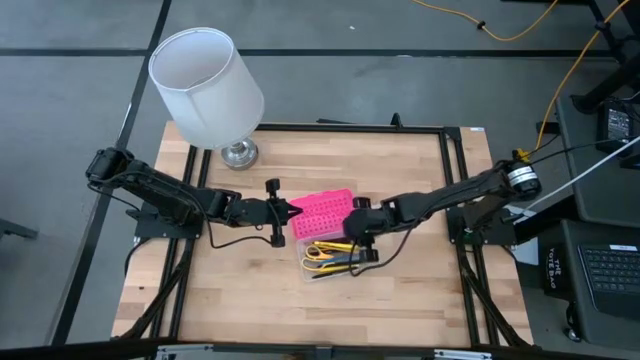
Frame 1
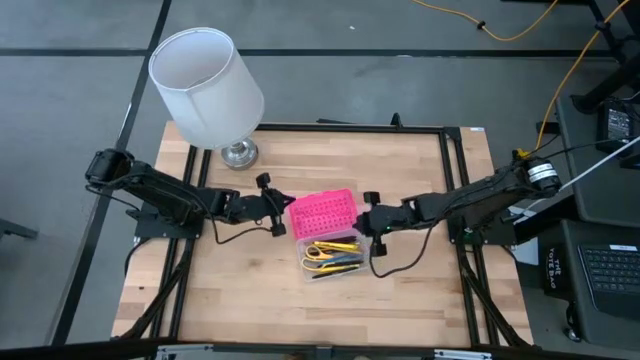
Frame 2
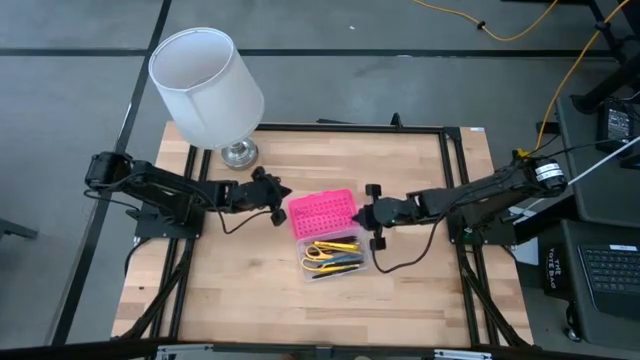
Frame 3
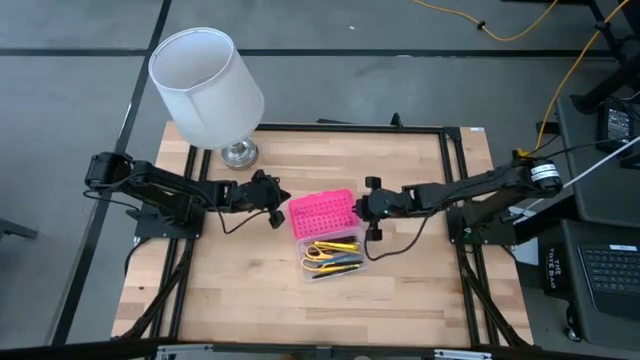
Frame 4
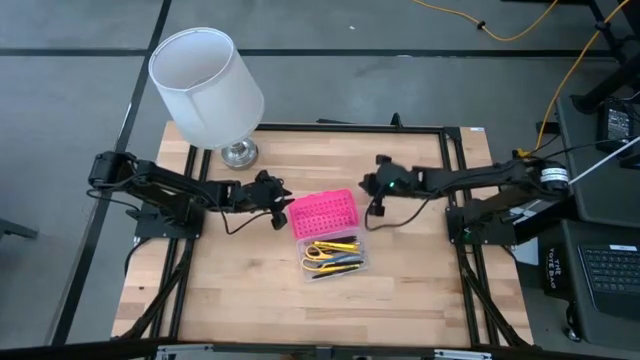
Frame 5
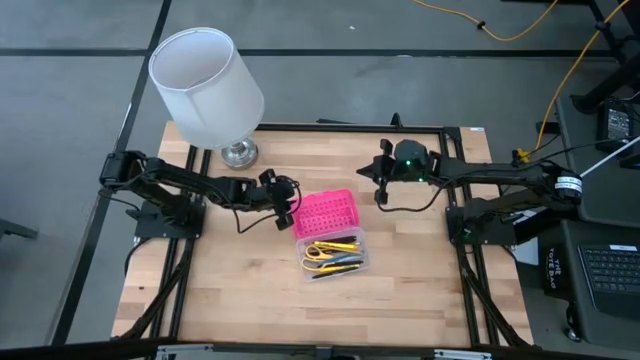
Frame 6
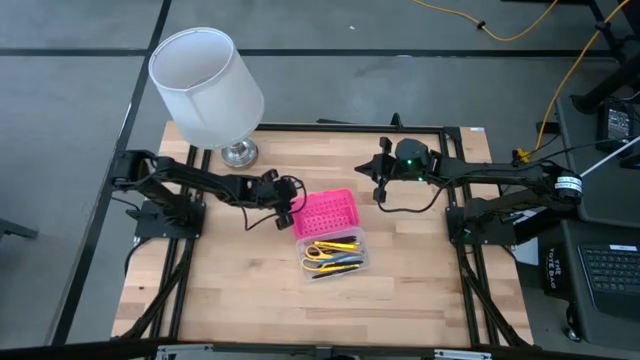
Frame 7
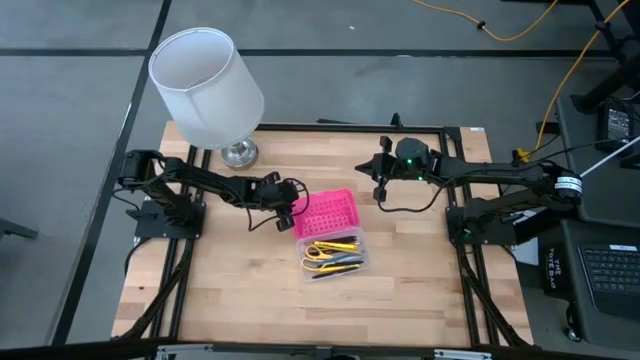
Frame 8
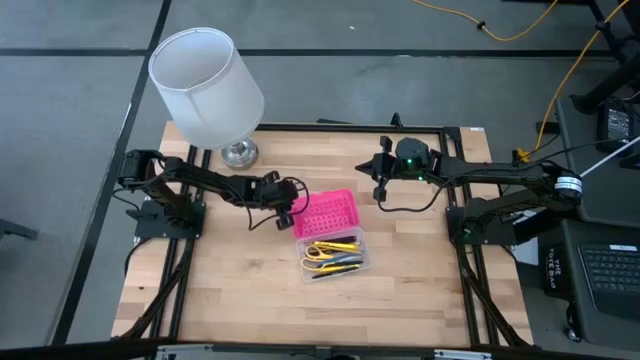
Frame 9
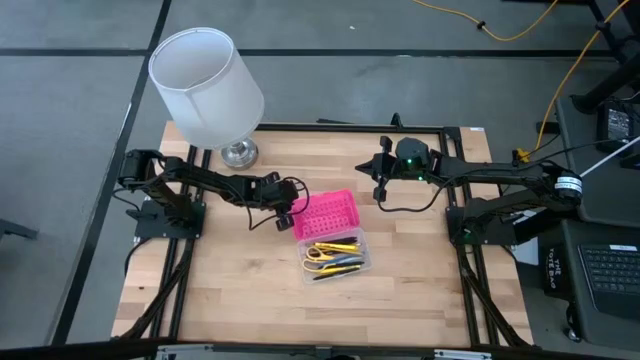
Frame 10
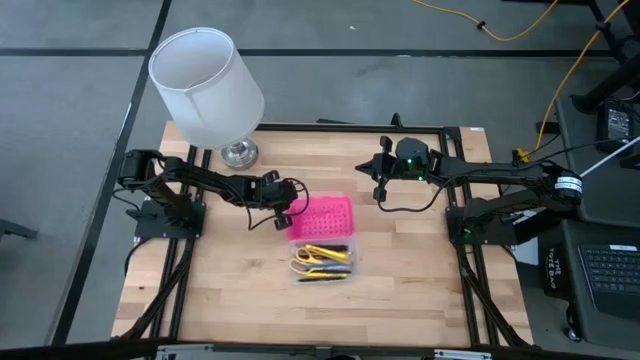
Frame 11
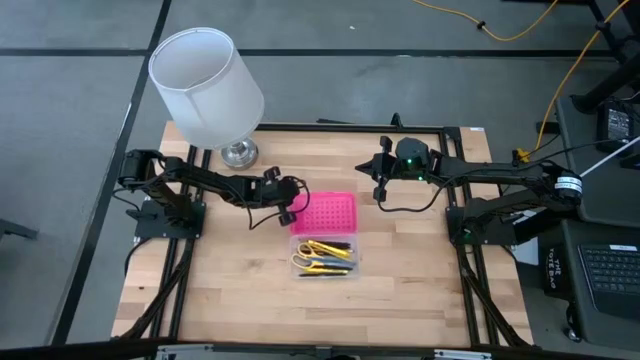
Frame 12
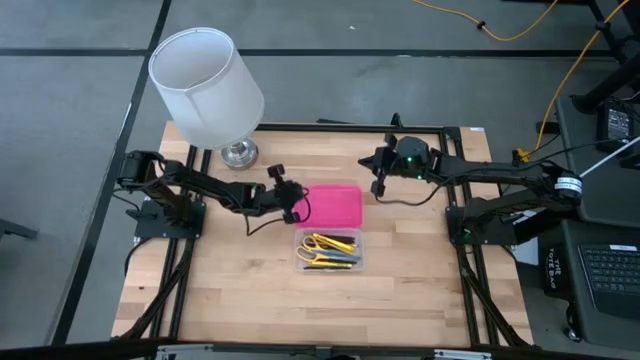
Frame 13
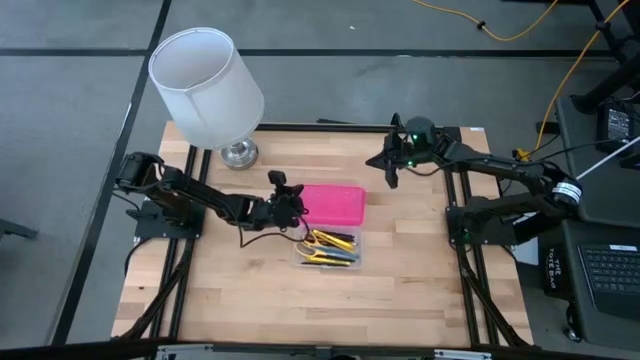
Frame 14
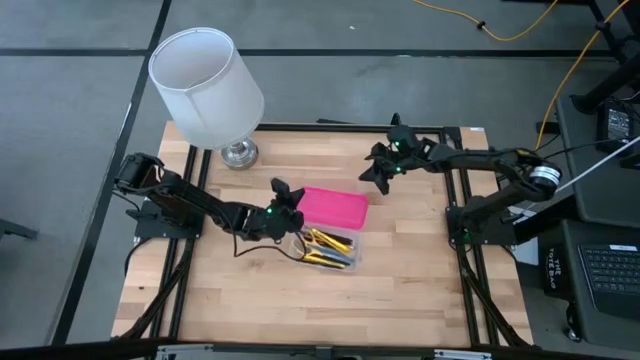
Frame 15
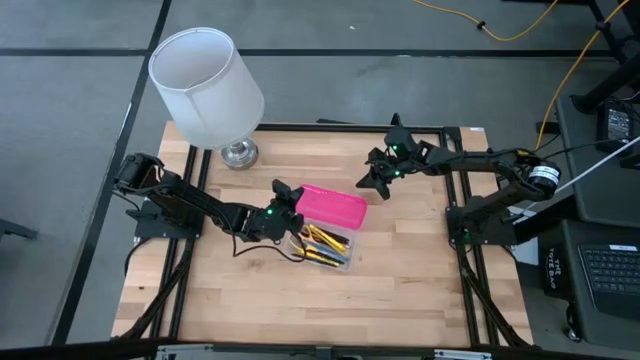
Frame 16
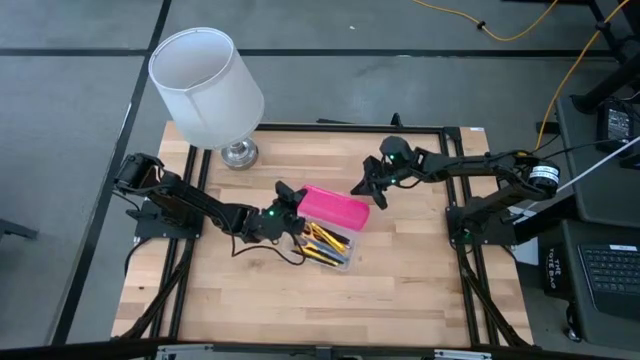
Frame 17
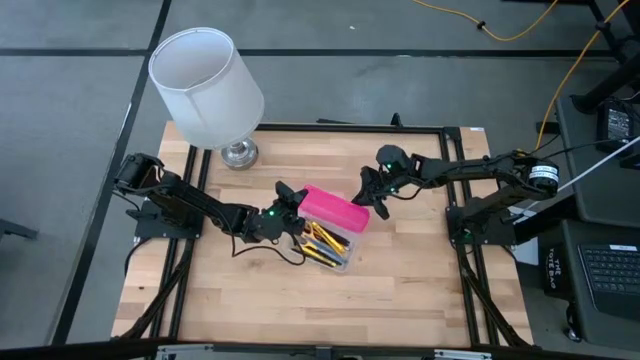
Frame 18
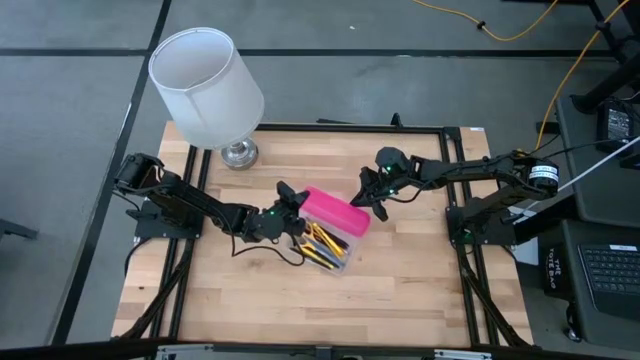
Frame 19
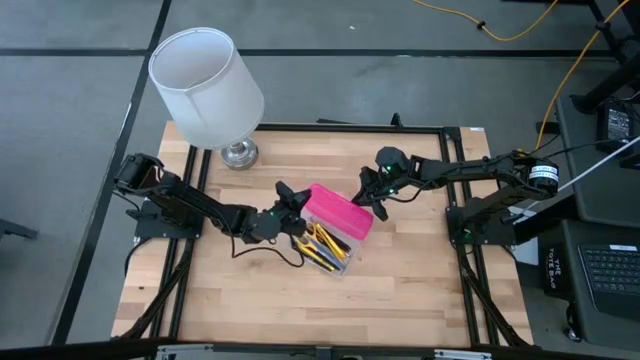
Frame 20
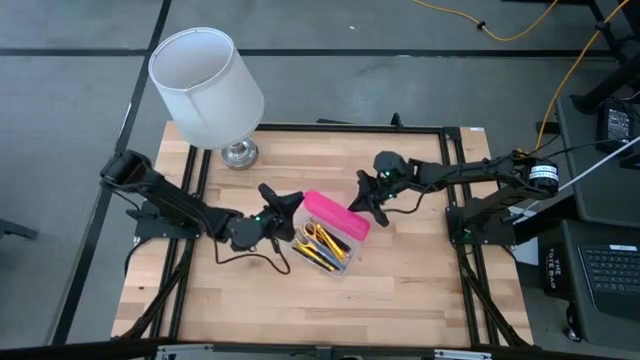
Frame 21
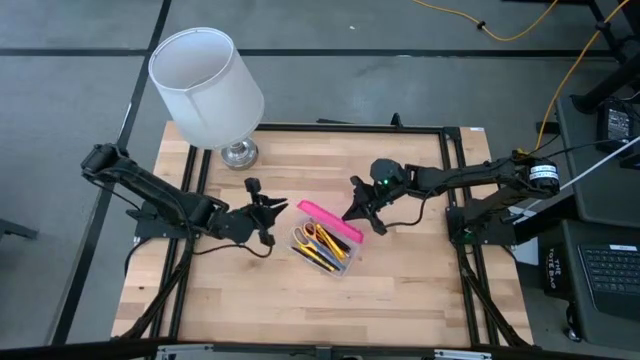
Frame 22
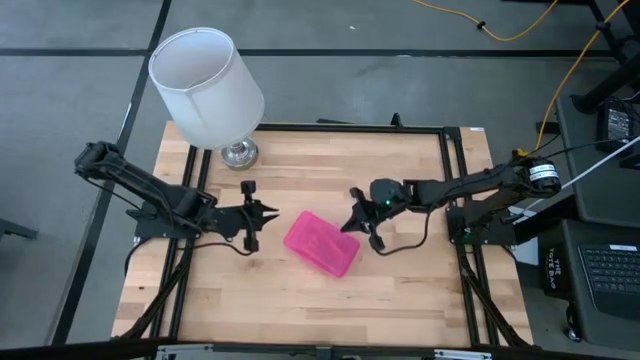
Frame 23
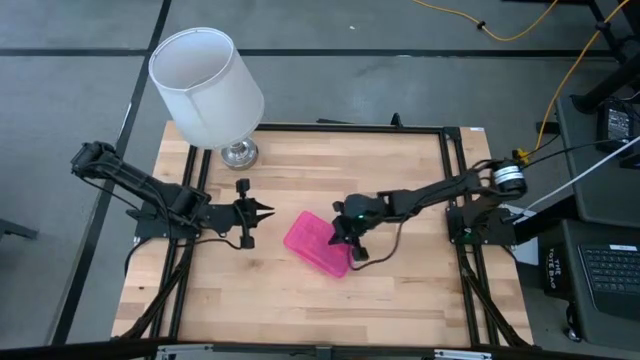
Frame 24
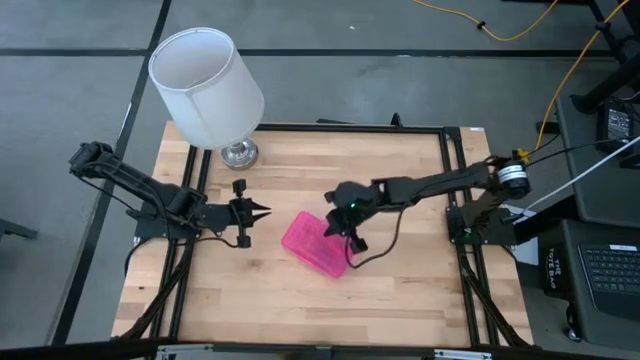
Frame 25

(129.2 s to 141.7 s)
Task: Pick & place school supplies into a supply box
Close the pink supply box

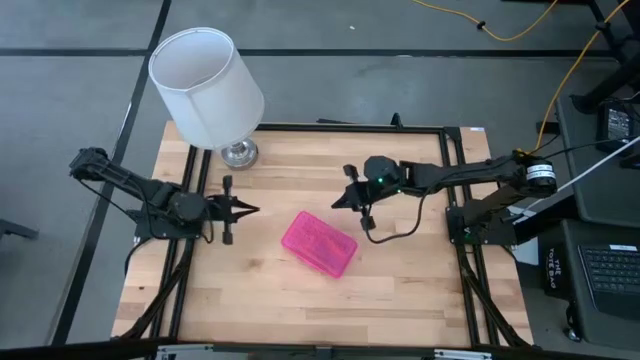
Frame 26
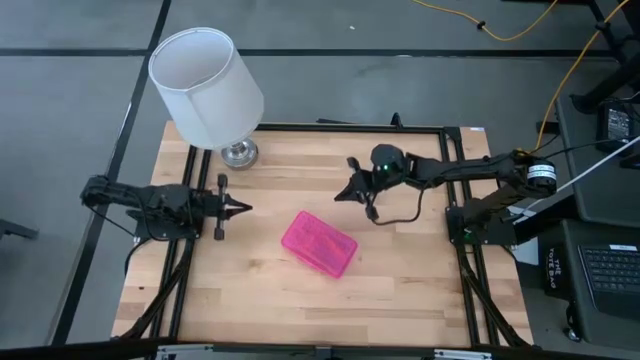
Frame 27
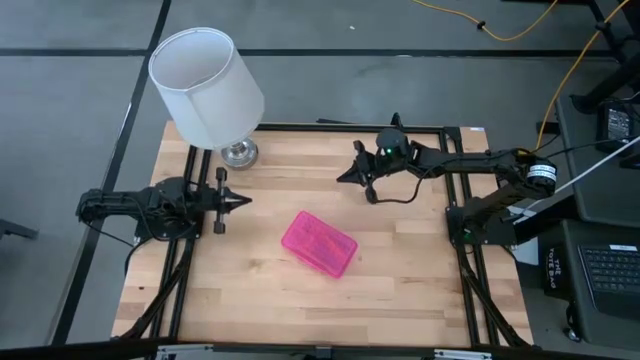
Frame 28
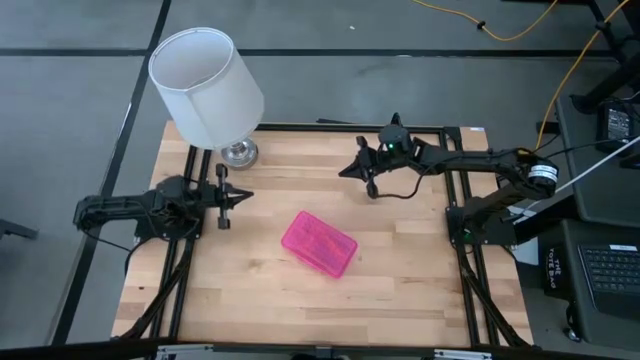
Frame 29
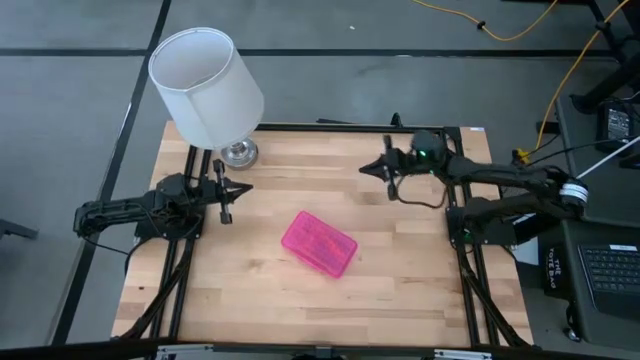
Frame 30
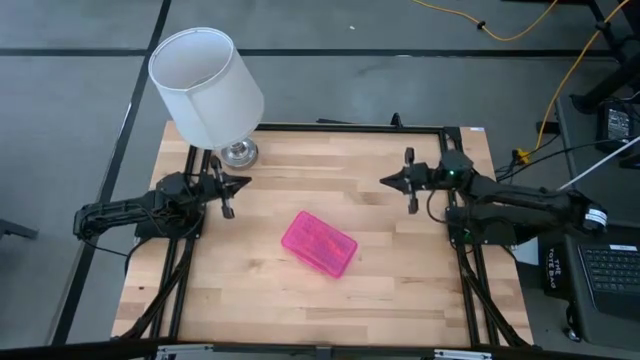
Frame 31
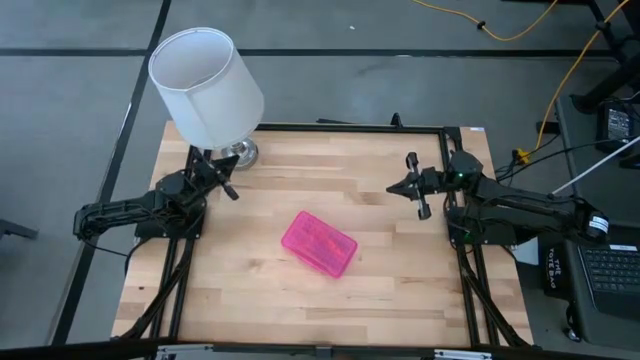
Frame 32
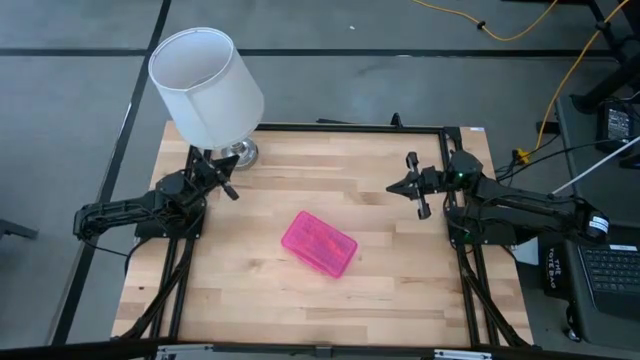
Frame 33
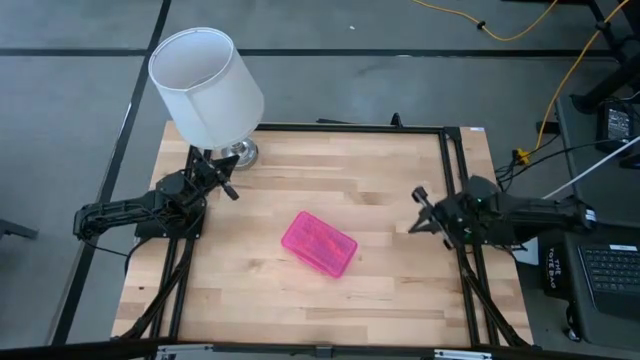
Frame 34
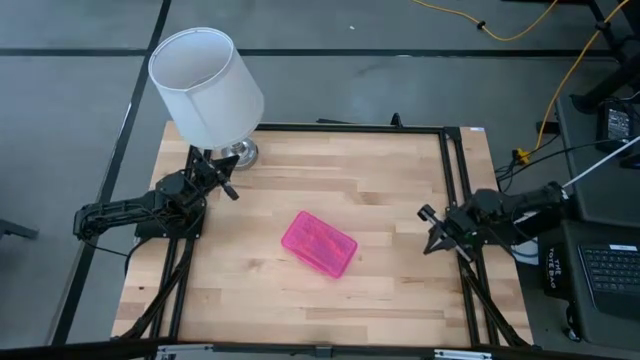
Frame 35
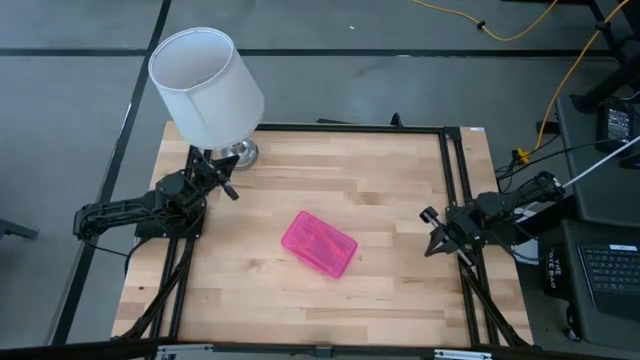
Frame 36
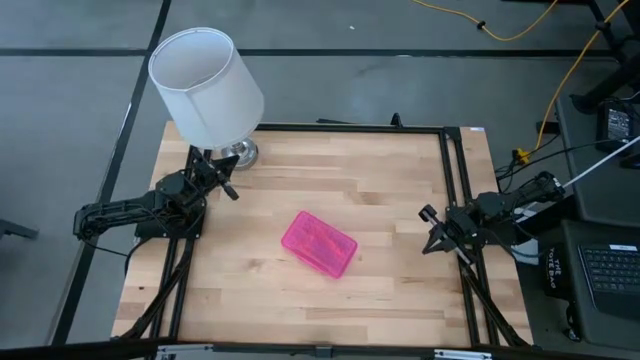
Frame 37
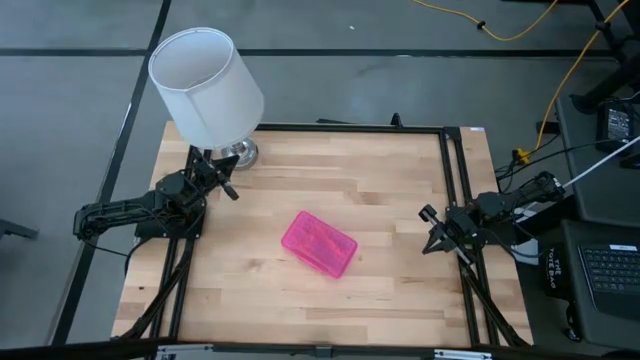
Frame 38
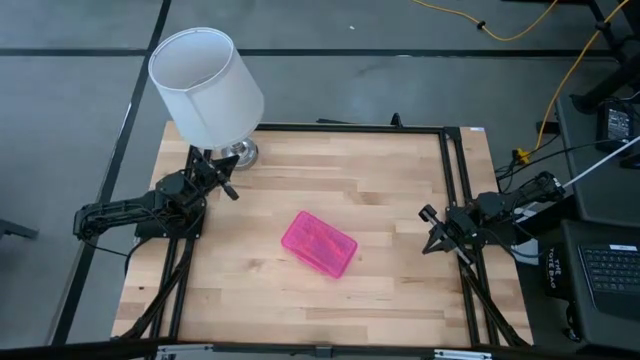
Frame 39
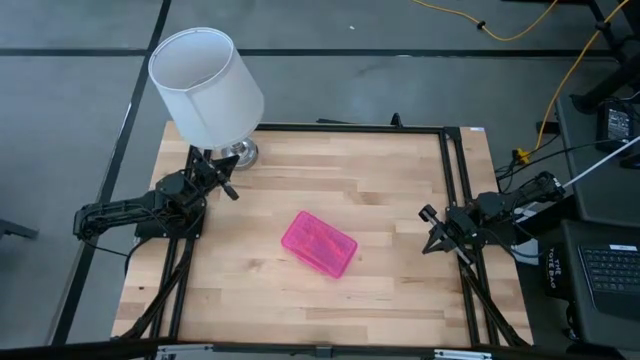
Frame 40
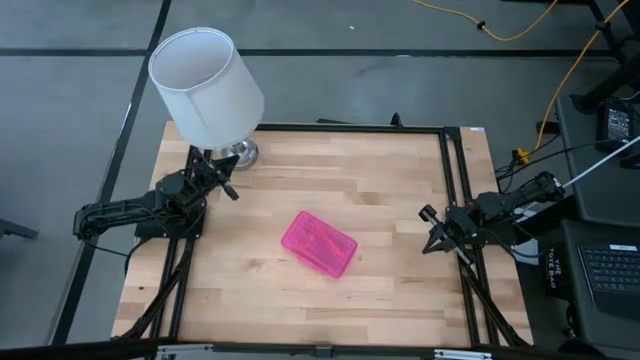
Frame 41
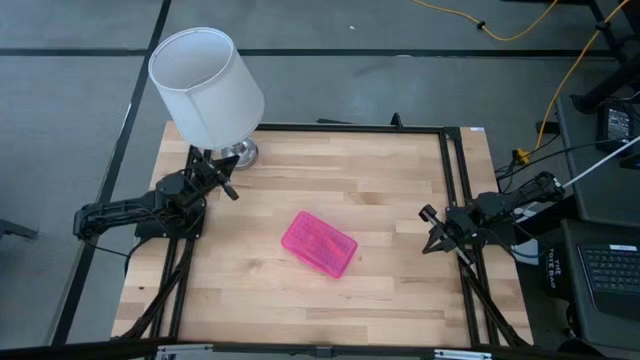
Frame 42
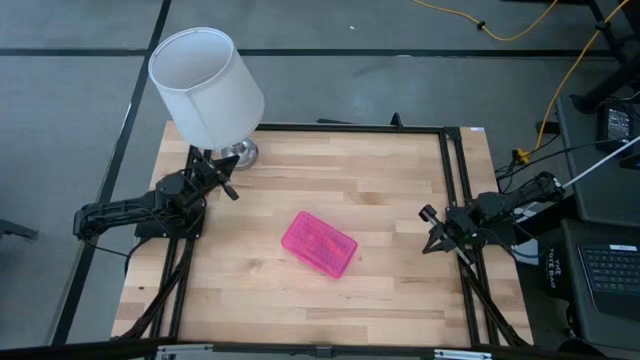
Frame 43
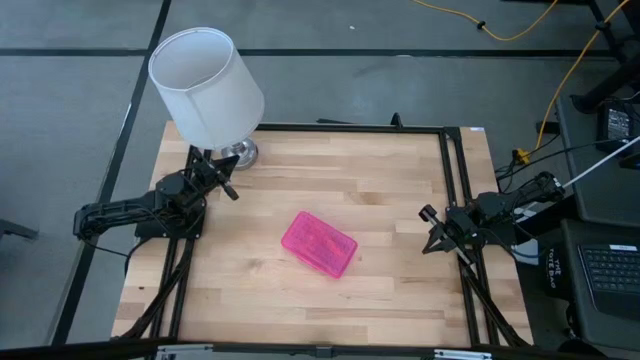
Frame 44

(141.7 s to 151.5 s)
Return to Home Position
